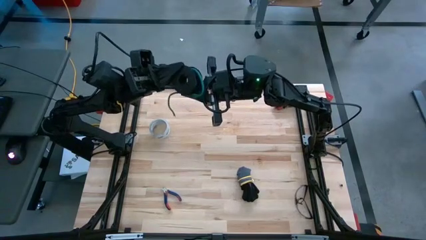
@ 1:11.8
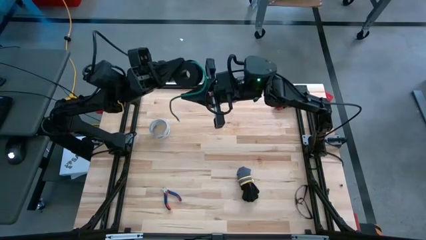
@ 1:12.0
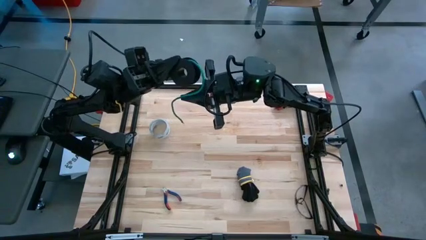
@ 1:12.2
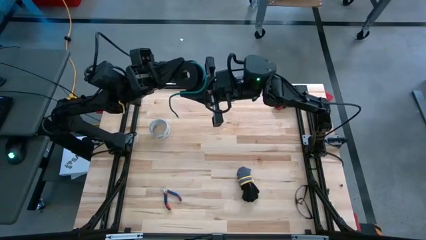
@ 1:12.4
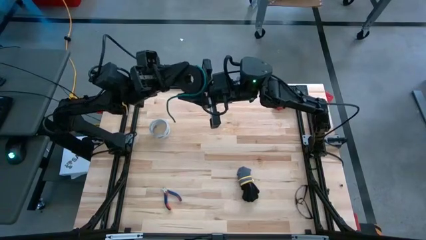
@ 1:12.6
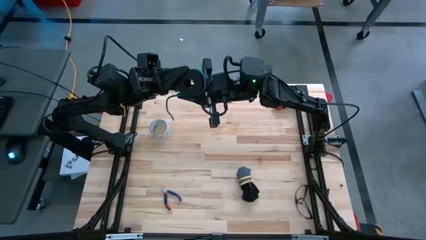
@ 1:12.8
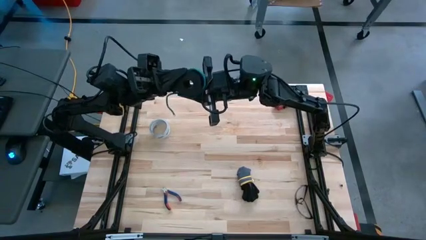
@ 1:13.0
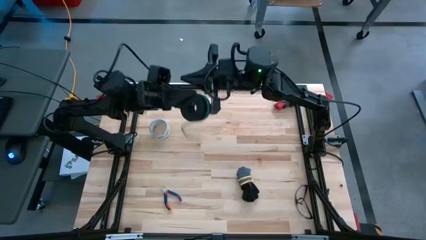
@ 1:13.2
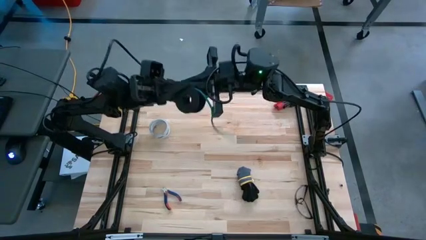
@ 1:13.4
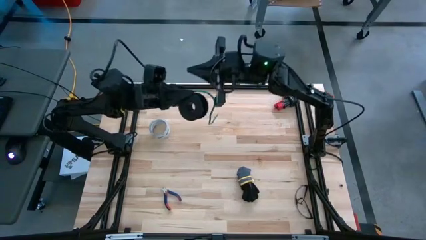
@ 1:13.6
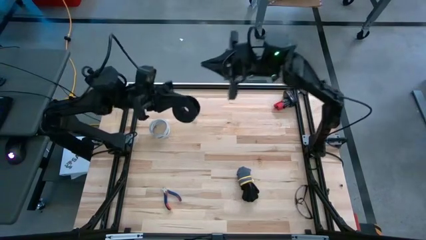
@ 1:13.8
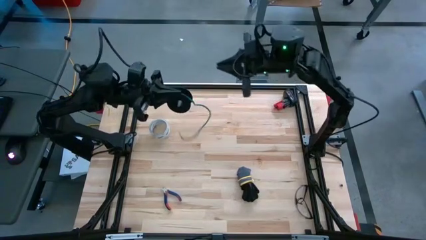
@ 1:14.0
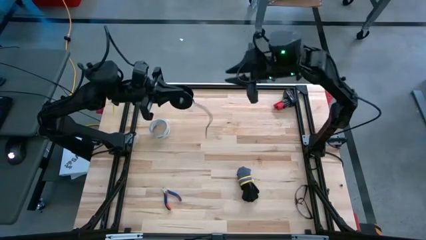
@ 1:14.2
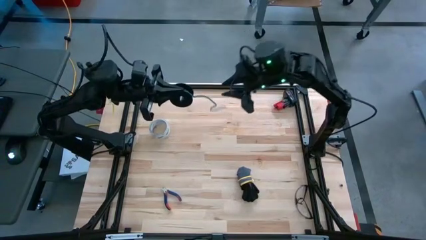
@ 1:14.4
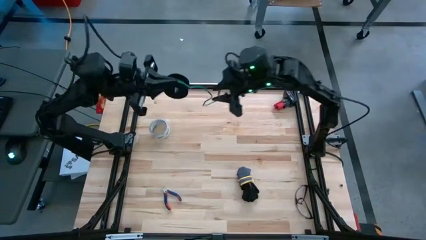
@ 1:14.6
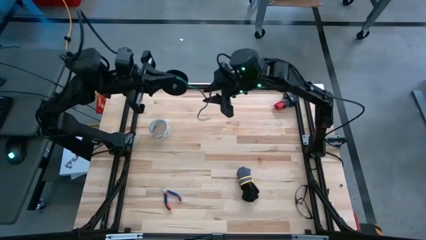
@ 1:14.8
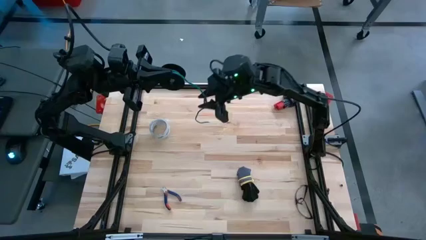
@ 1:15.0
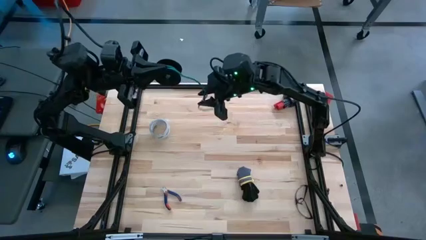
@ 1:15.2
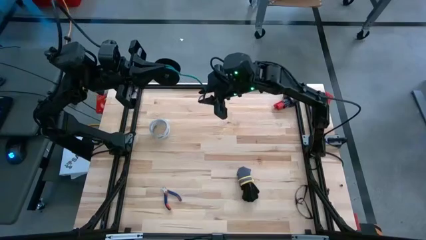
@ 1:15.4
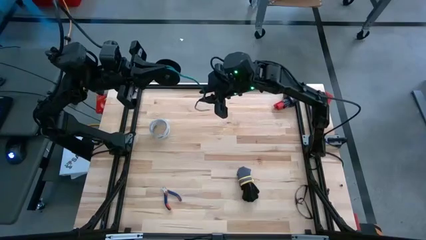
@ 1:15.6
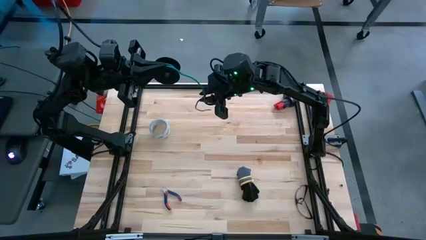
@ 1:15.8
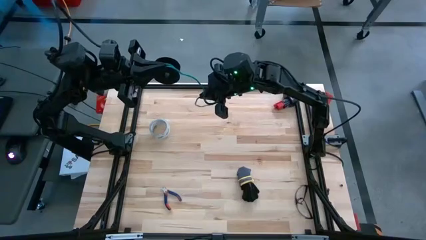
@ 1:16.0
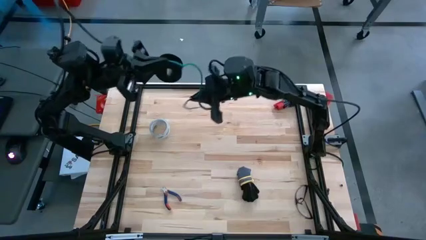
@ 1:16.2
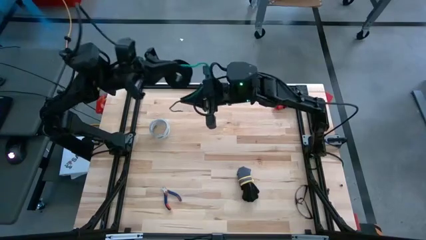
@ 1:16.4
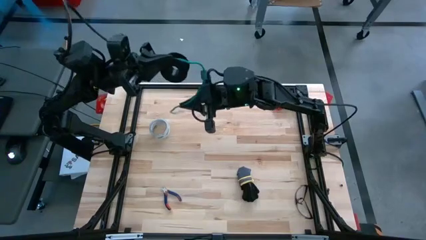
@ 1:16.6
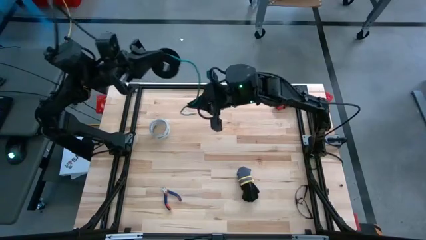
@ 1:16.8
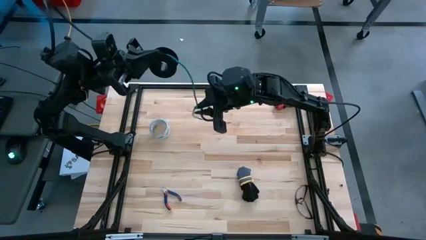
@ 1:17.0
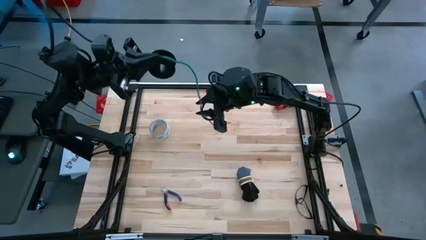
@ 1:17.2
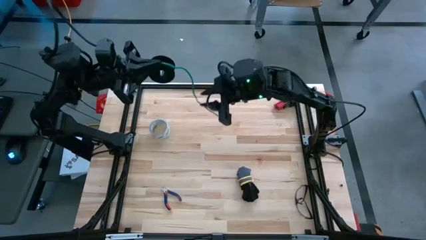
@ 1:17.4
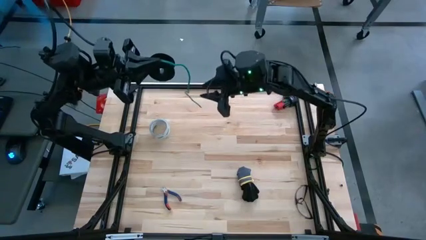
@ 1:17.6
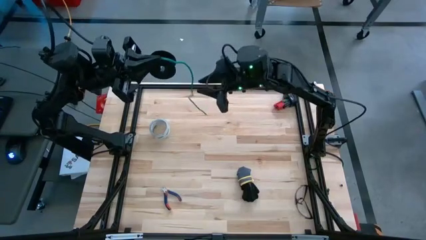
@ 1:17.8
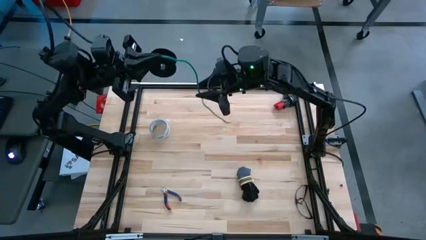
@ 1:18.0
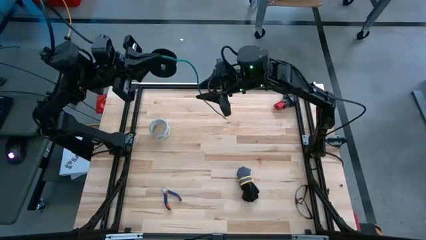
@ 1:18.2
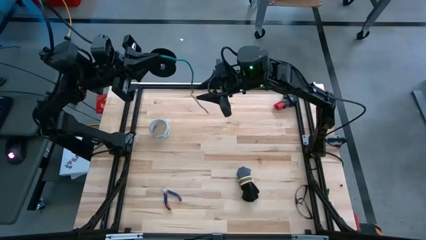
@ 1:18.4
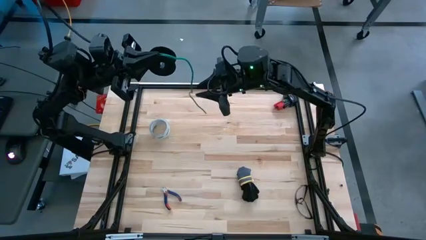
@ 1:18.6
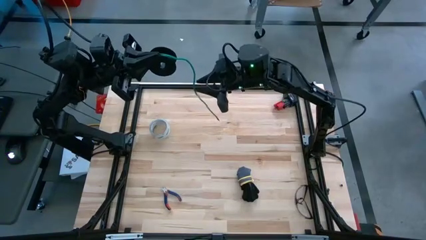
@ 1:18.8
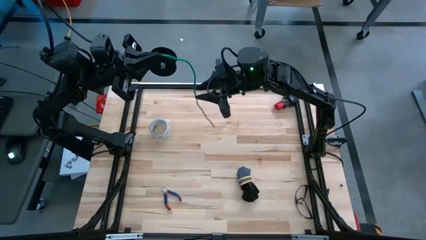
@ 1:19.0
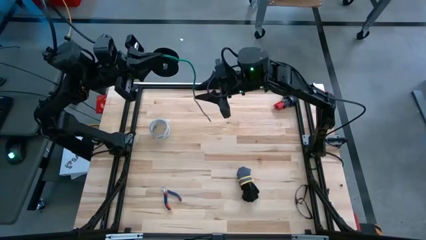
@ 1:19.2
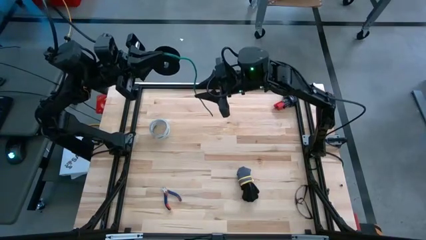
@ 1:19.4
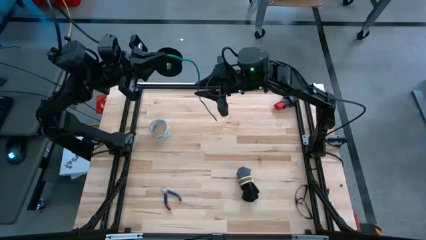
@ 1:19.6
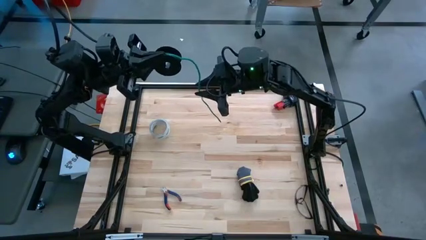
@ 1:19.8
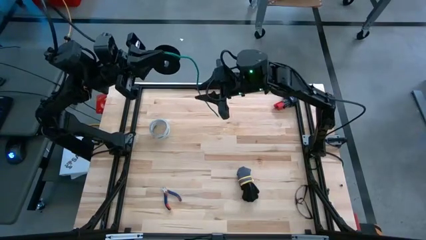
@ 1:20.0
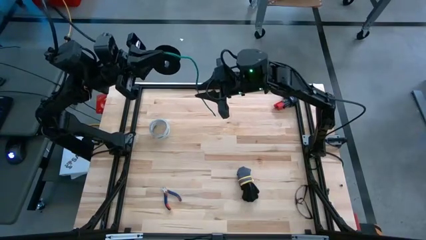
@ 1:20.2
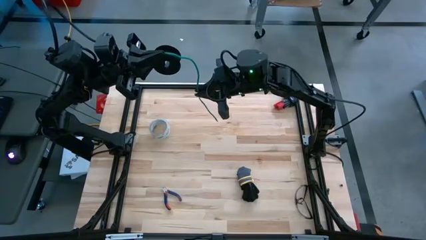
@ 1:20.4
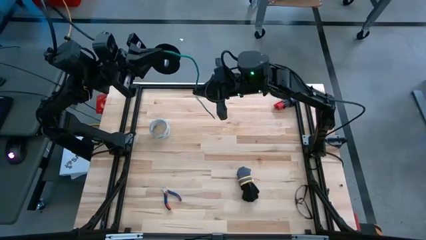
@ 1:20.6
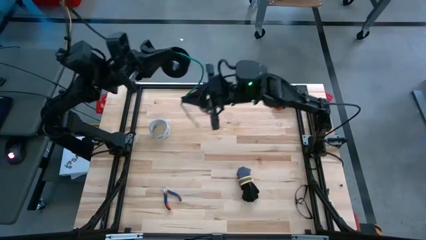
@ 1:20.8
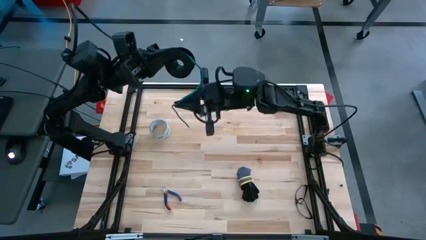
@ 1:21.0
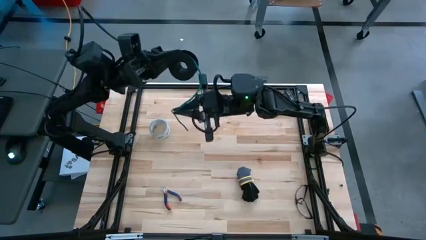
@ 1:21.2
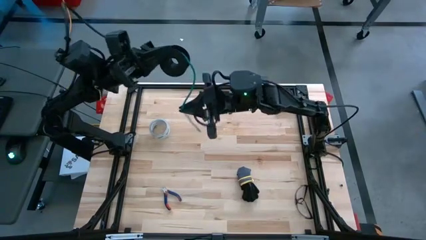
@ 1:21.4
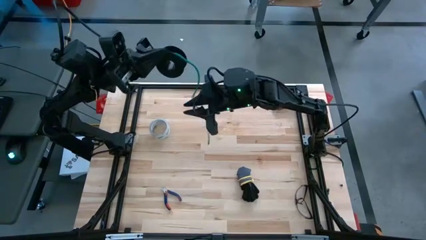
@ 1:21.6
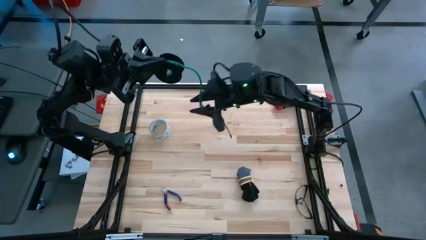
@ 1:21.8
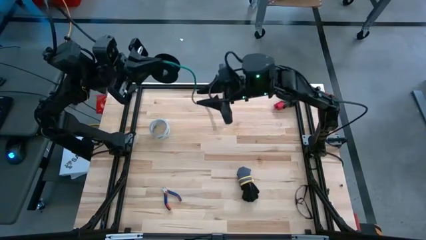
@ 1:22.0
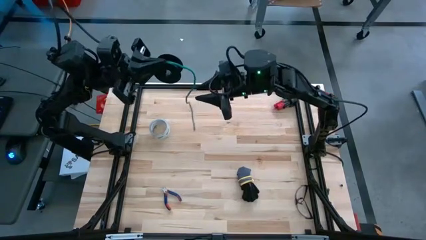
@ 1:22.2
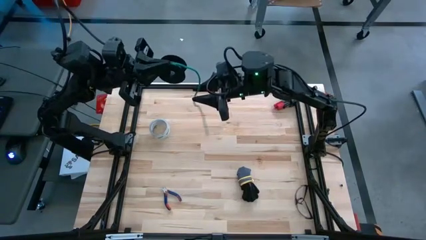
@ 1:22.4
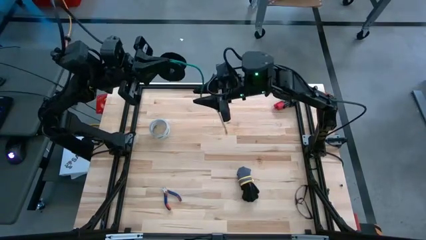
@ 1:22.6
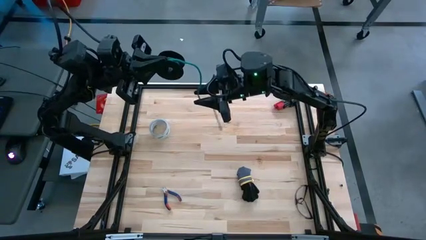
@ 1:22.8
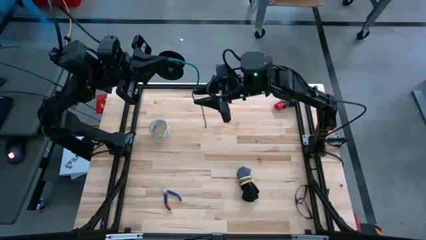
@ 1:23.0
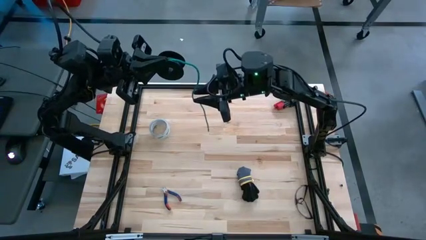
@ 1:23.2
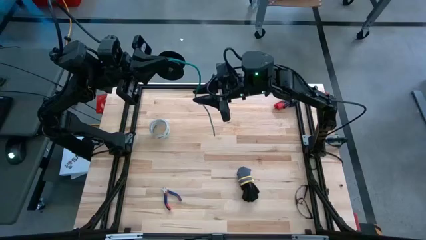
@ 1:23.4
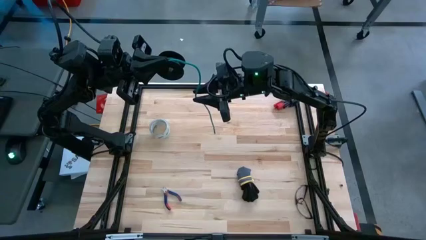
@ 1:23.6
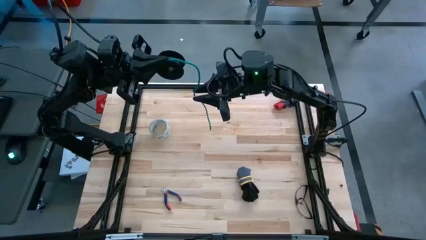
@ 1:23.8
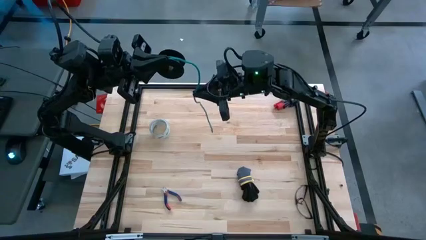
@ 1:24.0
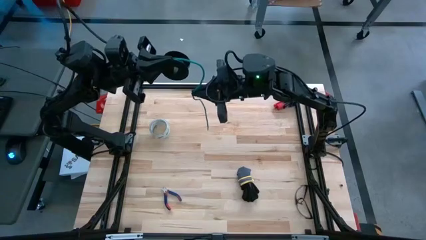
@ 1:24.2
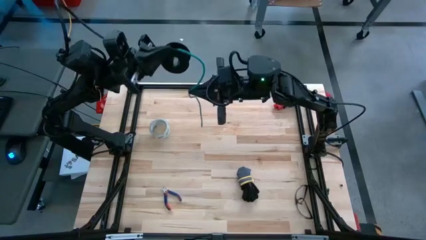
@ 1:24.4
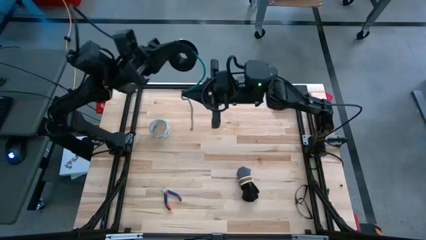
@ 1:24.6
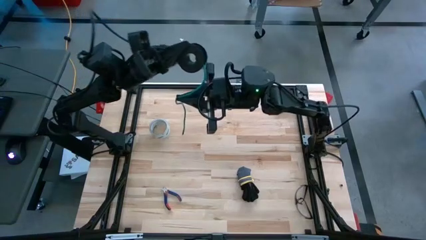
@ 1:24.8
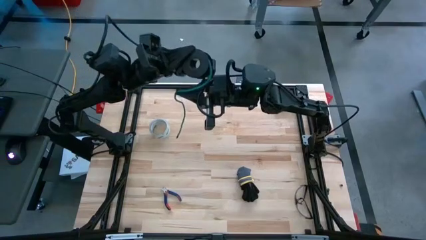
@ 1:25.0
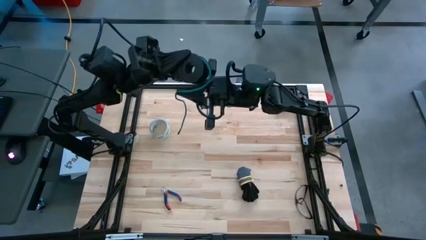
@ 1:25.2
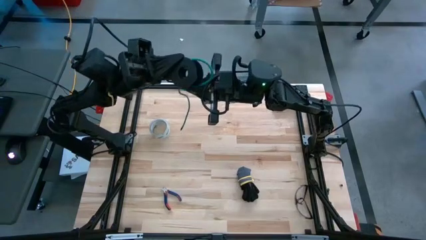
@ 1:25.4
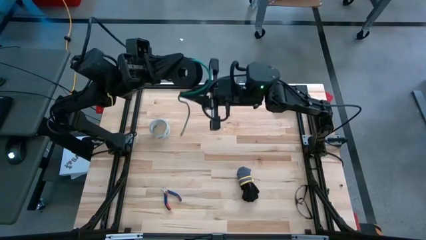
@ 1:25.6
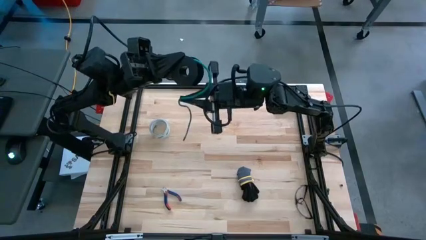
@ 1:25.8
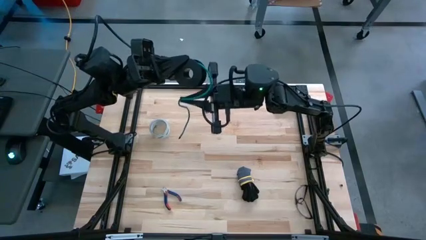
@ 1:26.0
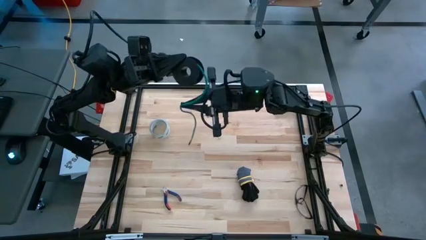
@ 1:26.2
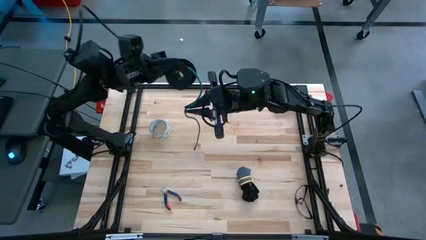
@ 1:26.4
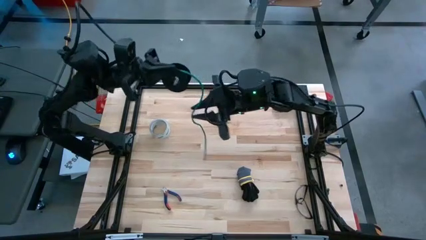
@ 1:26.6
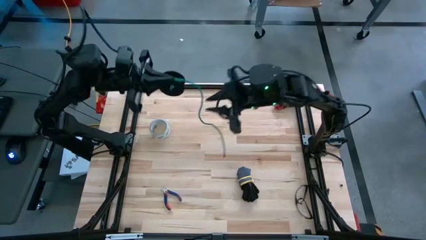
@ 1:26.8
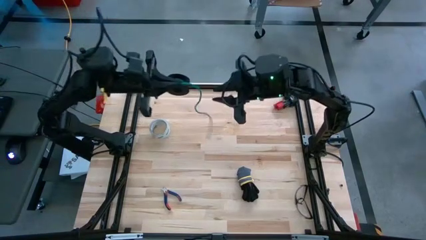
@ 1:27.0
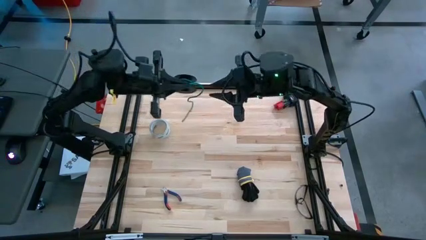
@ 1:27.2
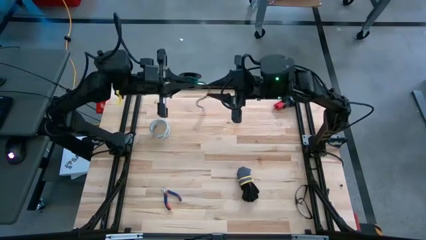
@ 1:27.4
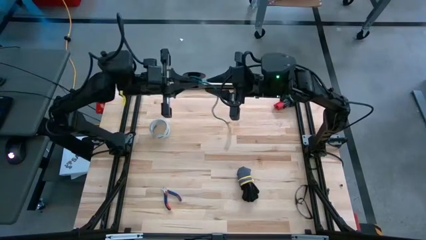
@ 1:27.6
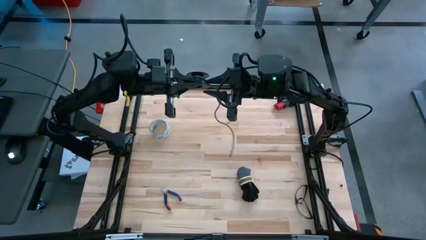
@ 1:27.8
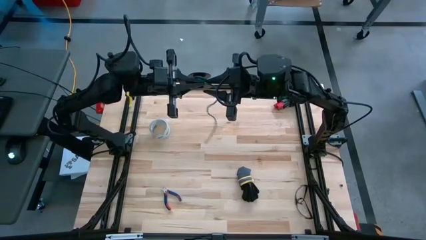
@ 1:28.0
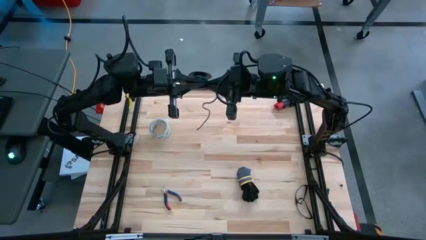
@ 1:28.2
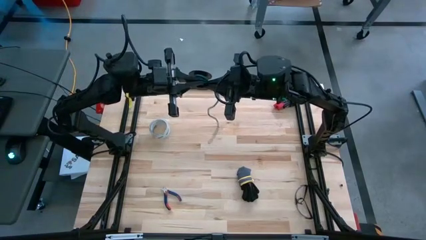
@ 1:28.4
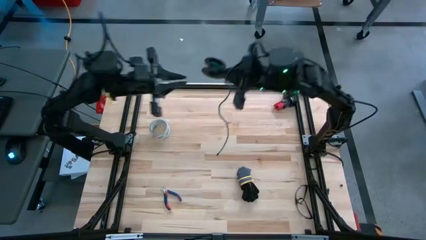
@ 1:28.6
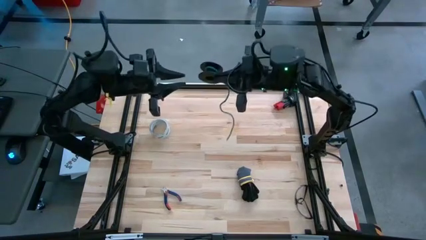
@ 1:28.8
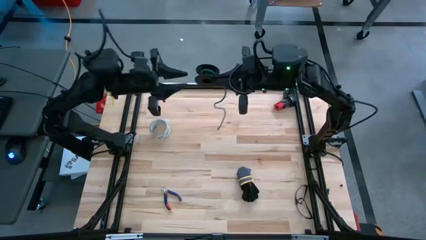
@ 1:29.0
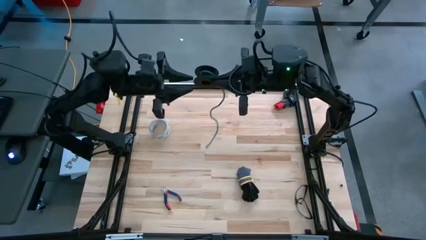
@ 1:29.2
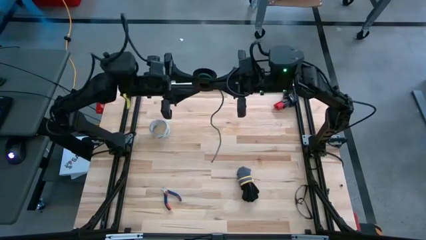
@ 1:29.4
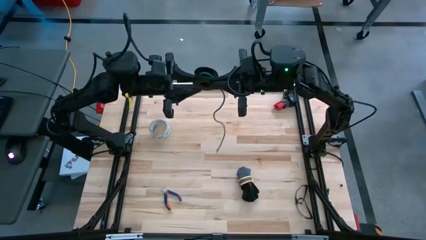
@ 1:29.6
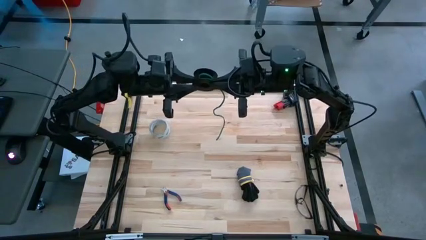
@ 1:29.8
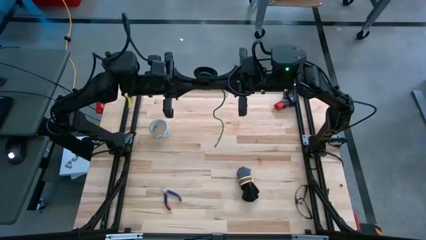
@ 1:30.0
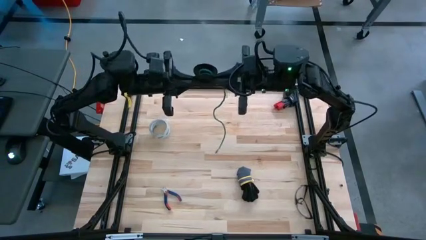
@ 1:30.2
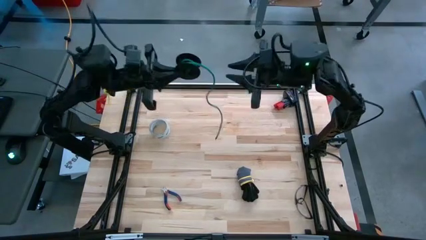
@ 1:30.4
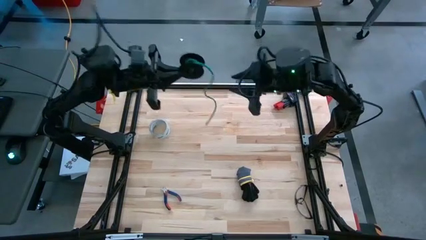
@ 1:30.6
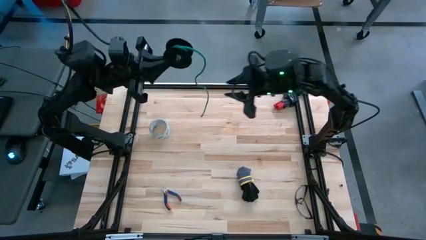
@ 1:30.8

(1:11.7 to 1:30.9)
Task: Coil cords
Coil the green wire on the spool
